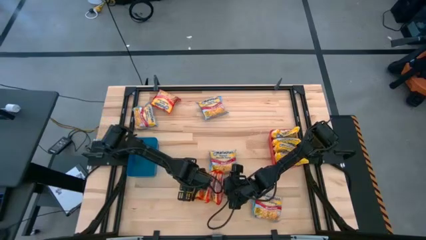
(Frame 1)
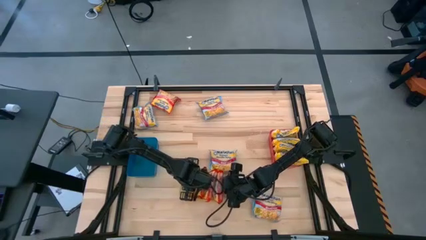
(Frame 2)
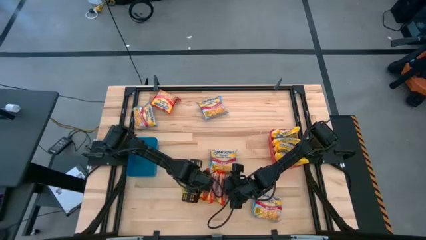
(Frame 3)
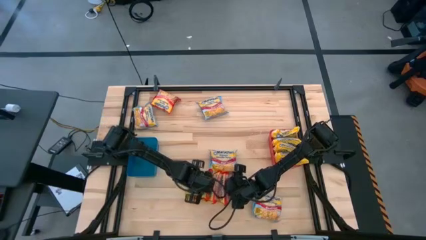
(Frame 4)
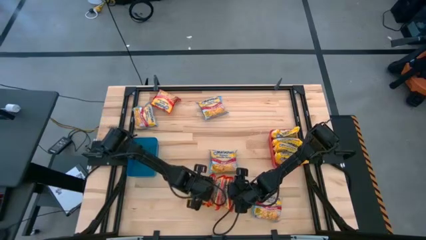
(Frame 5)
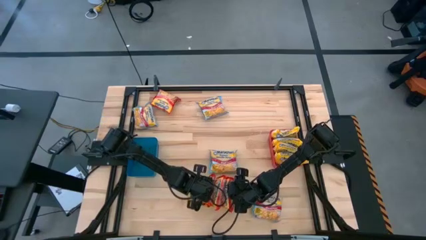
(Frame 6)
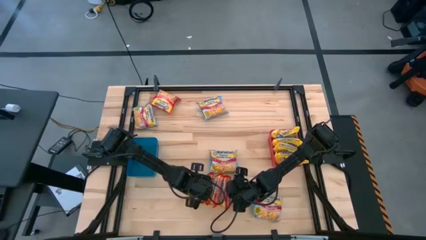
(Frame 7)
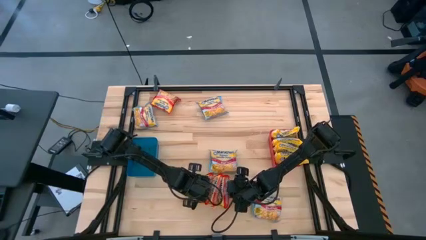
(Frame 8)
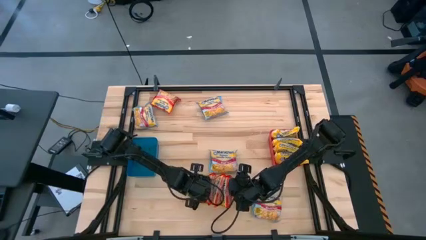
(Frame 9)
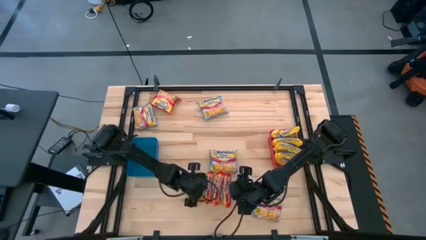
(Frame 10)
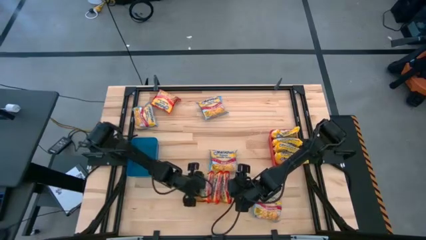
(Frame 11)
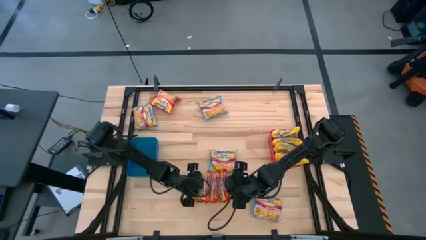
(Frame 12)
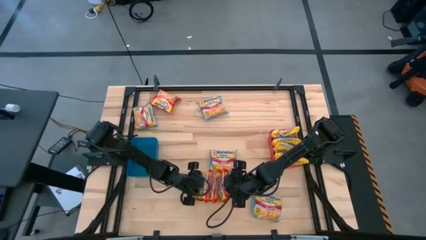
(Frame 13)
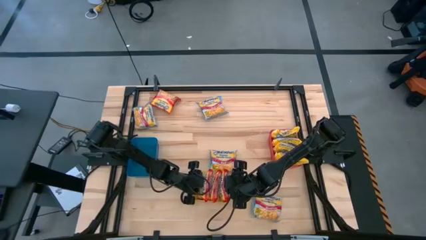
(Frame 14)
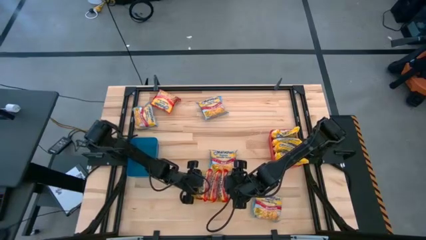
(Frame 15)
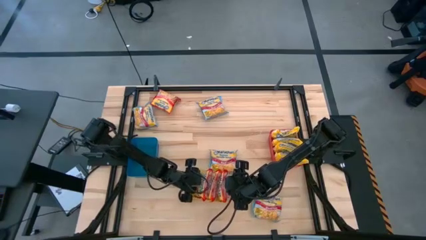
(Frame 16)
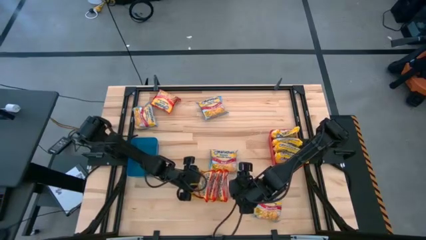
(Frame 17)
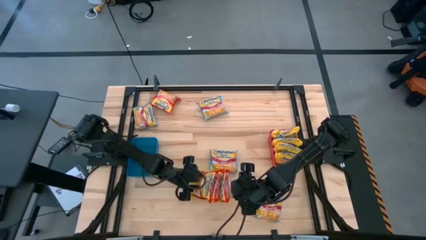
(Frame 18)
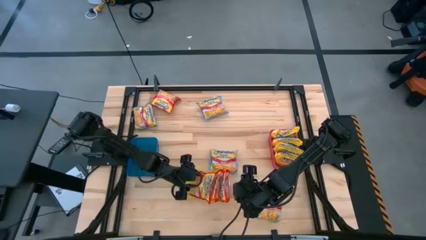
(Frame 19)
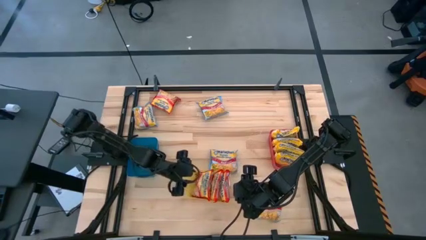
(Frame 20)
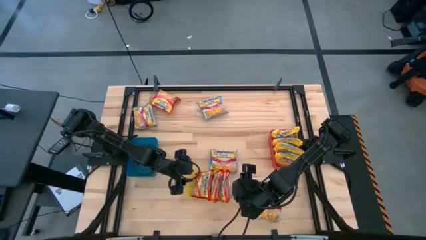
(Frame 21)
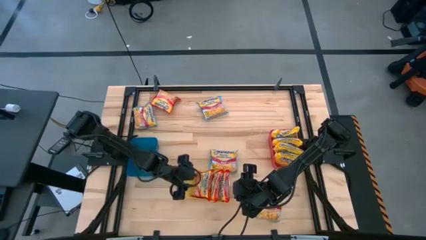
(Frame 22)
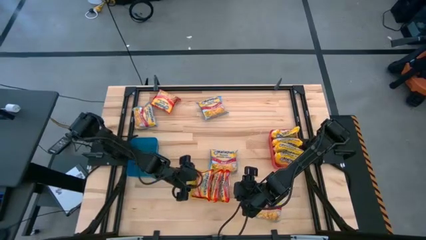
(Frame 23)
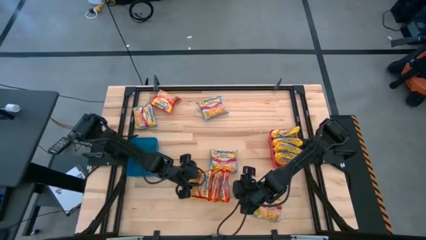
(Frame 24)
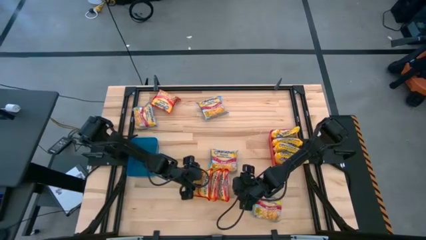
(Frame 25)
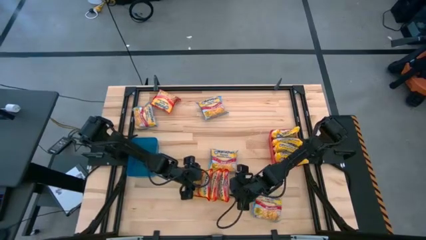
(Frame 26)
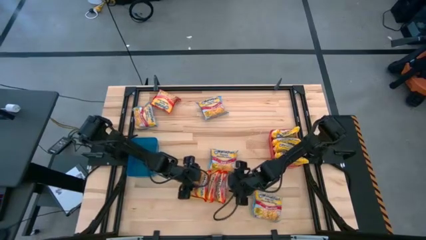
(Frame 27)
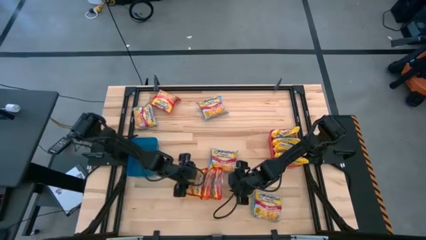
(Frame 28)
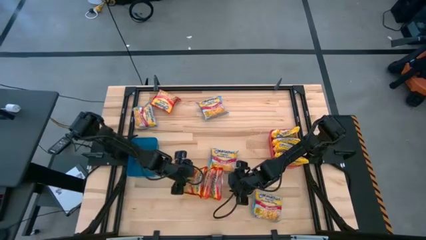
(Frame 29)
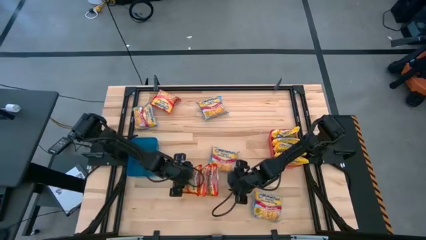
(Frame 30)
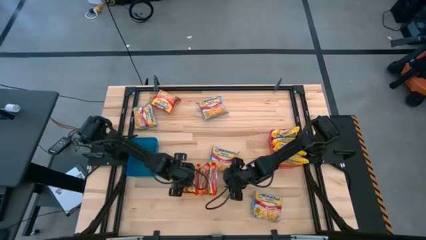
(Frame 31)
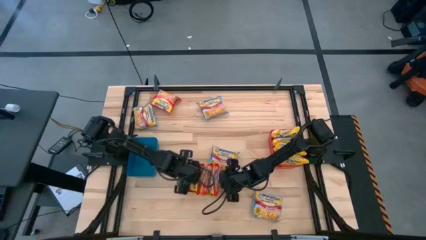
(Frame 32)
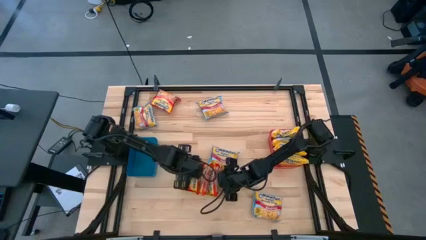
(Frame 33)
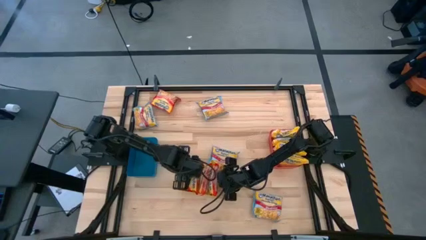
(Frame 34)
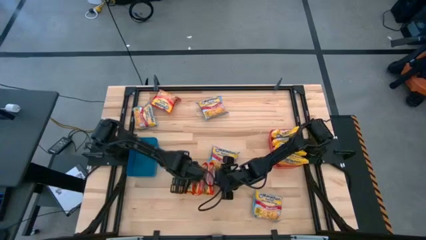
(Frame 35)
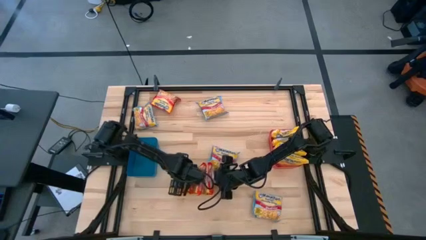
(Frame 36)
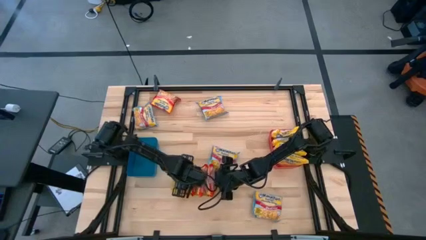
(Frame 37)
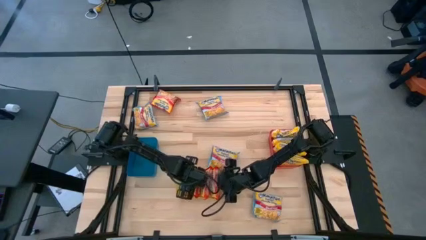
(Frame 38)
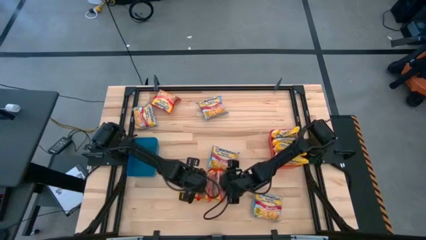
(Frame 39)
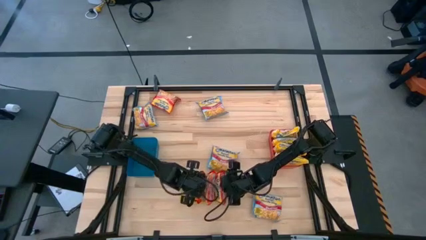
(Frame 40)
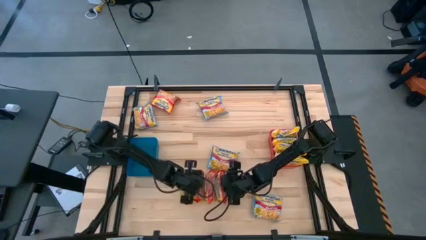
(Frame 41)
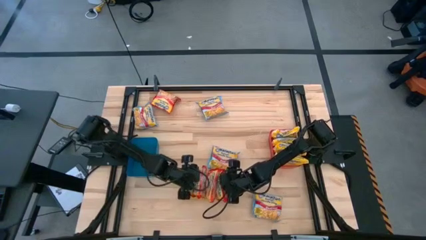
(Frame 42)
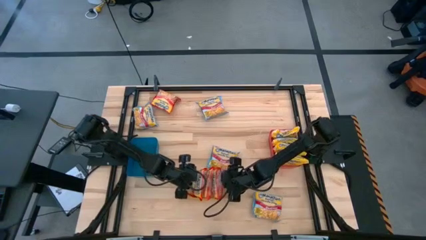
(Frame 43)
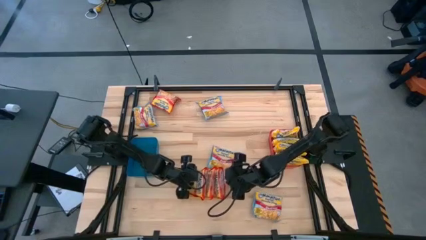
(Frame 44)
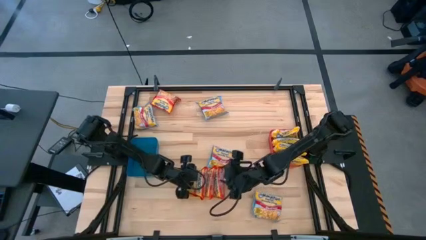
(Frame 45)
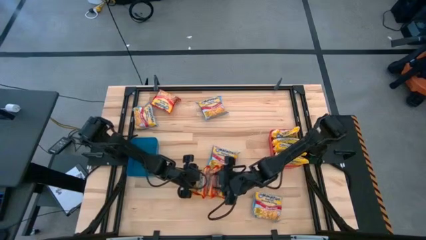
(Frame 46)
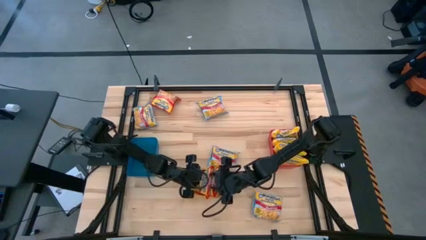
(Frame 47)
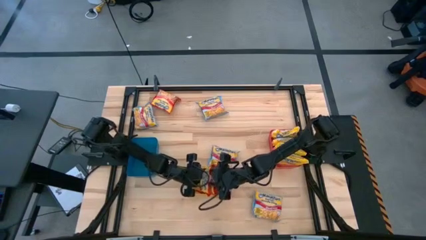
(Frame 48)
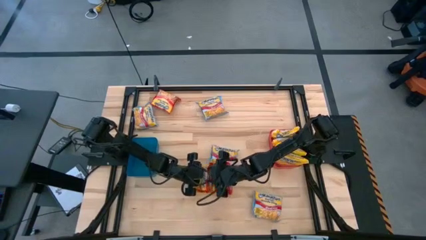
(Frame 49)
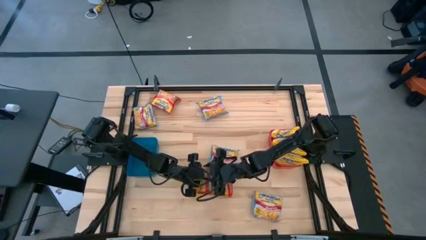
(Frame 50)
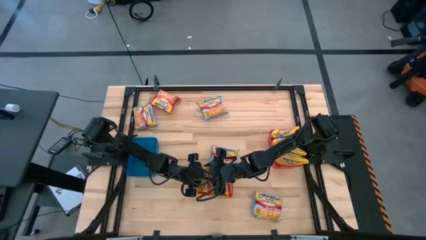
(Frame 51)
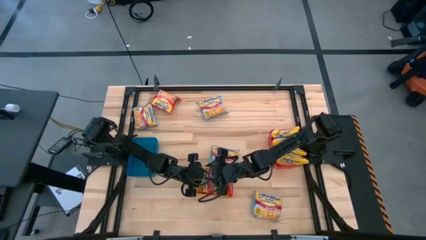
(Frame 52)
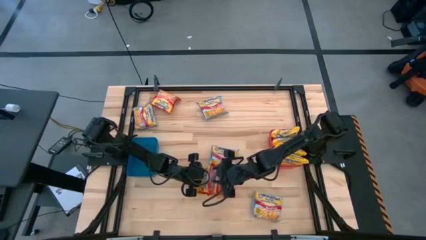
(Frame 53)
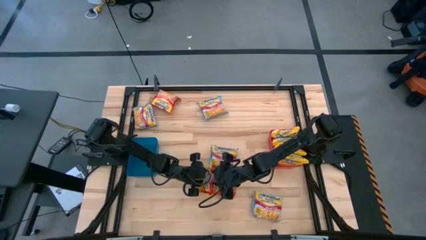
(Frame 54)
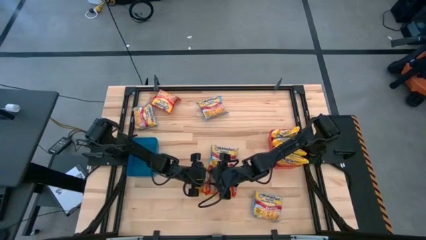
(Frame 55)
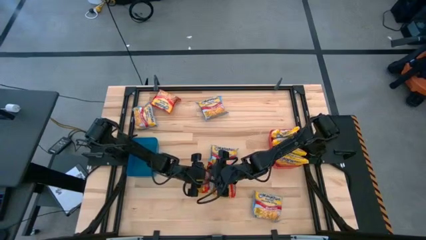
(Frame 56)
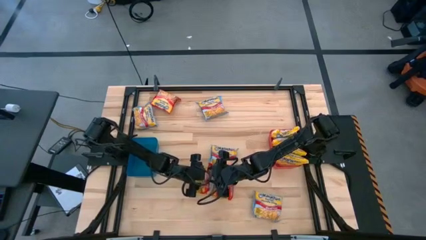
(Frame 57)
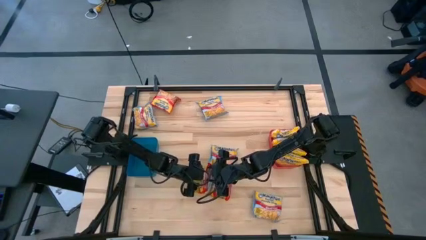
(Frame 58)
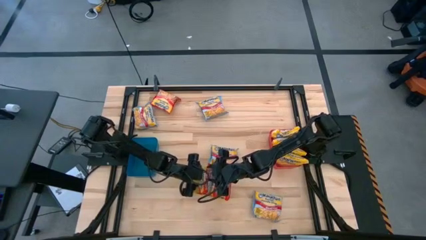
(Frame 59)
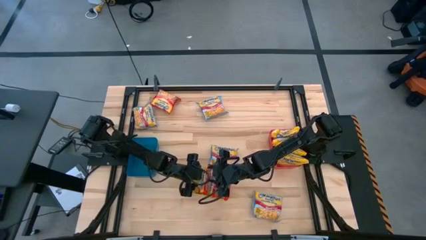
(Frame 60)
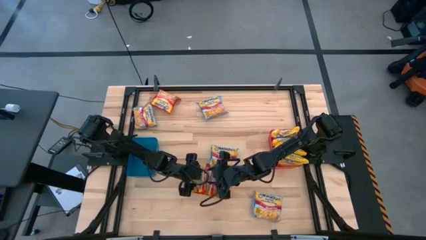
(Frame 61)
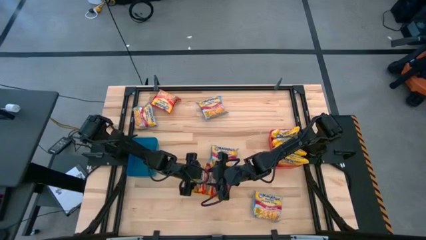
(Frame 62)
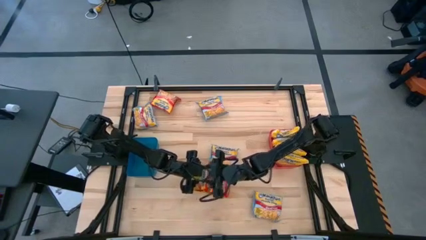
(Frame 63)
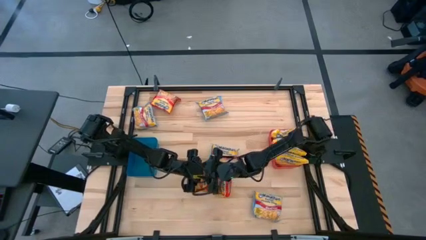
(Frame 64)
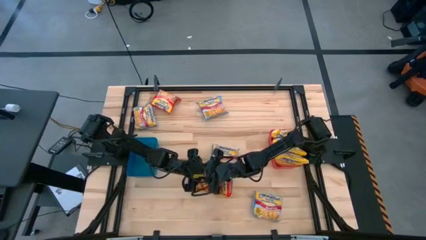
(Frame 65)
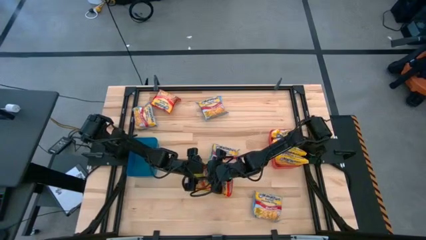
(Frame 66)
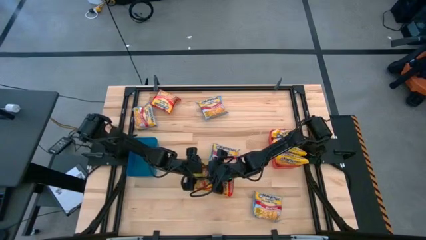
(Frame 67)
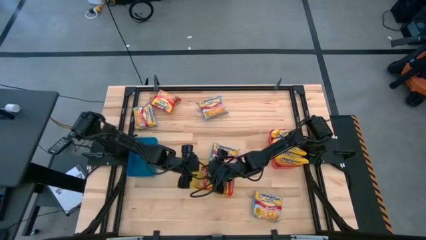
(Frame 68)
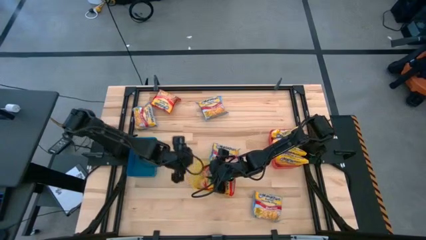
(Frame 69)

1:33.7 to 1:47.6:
Task: Sort Maruchan noodles
Put the red noodle pack into the yellow bin
